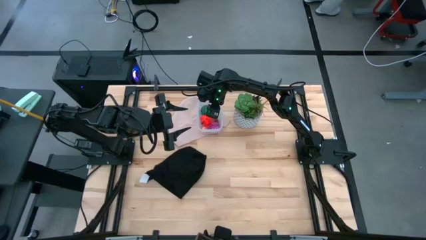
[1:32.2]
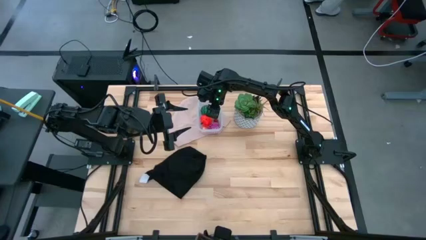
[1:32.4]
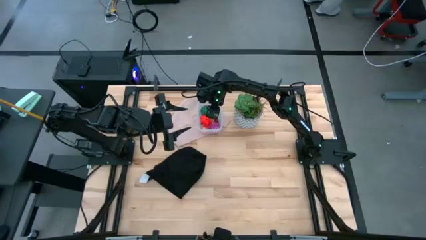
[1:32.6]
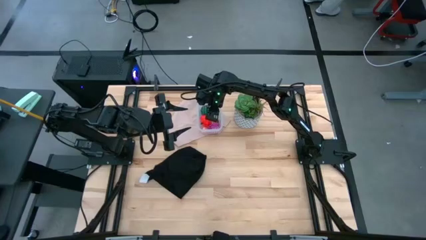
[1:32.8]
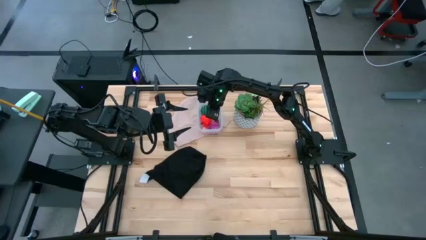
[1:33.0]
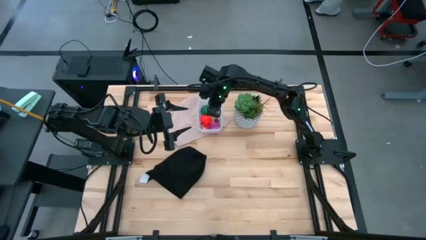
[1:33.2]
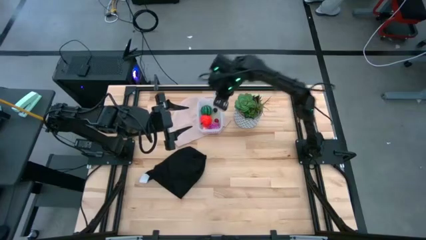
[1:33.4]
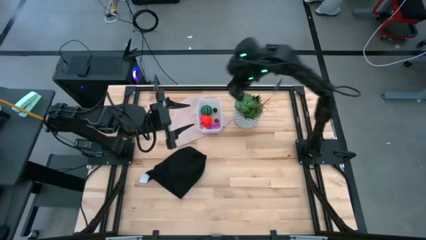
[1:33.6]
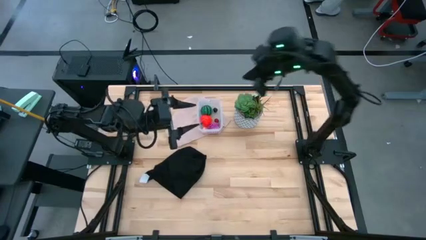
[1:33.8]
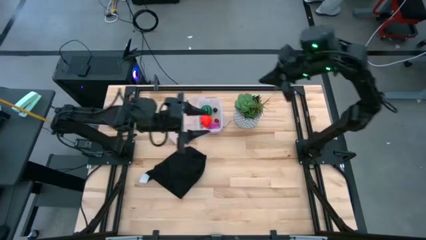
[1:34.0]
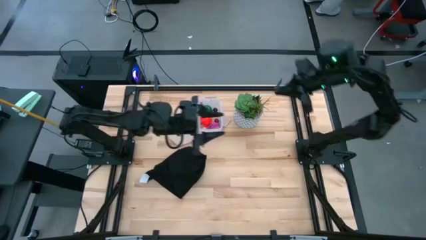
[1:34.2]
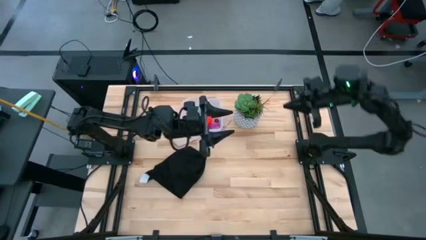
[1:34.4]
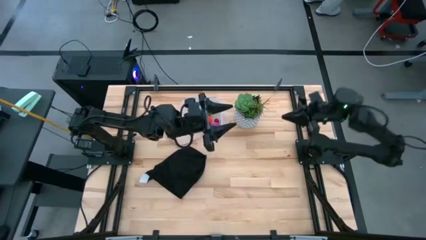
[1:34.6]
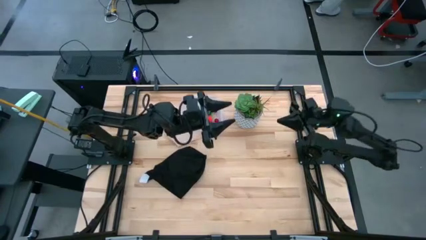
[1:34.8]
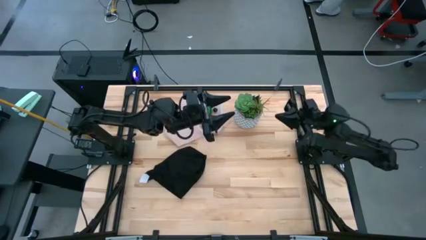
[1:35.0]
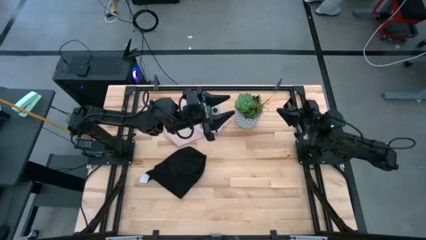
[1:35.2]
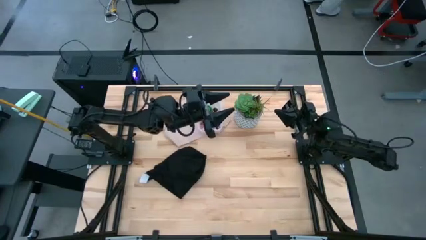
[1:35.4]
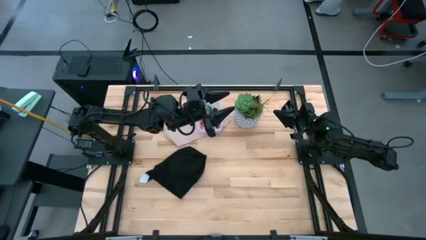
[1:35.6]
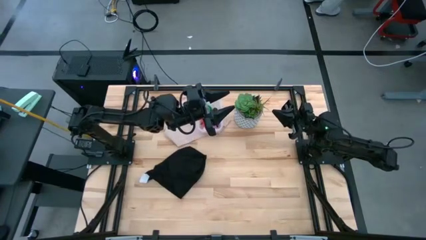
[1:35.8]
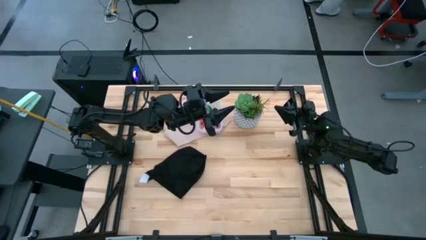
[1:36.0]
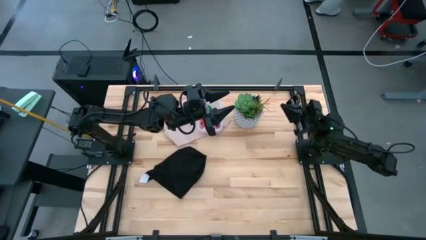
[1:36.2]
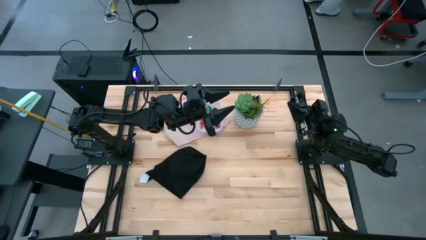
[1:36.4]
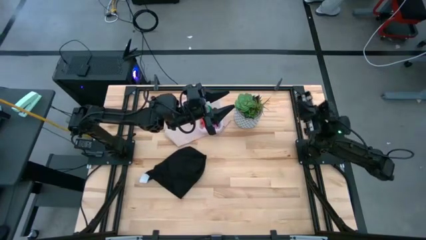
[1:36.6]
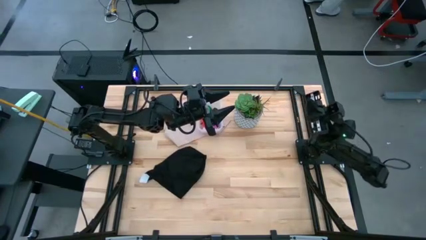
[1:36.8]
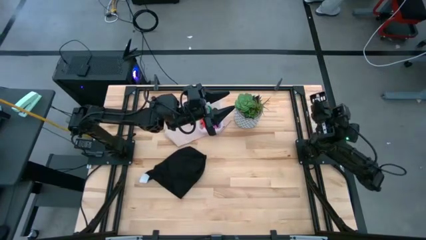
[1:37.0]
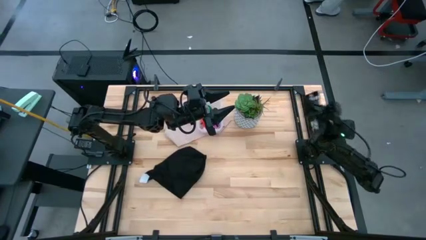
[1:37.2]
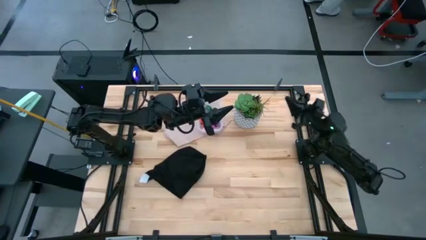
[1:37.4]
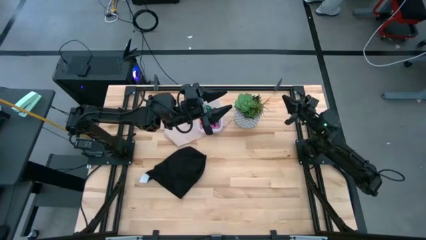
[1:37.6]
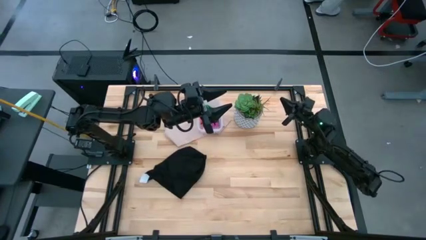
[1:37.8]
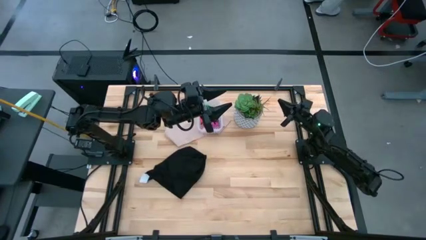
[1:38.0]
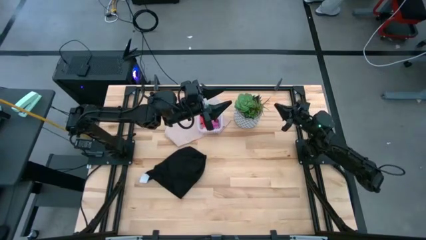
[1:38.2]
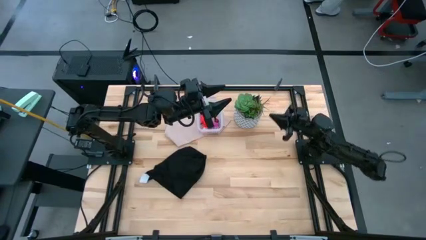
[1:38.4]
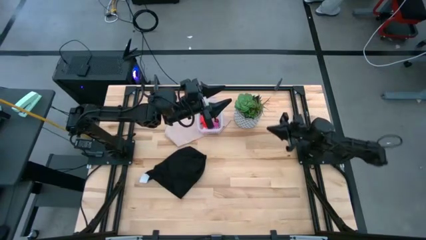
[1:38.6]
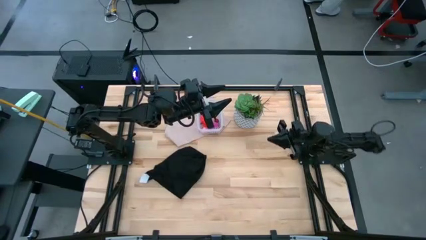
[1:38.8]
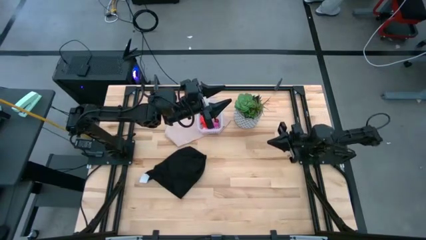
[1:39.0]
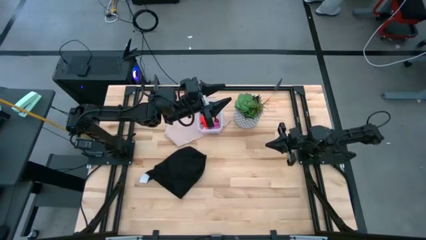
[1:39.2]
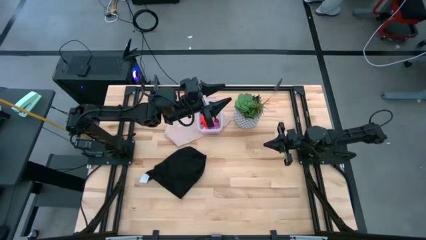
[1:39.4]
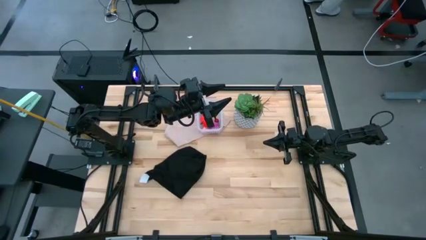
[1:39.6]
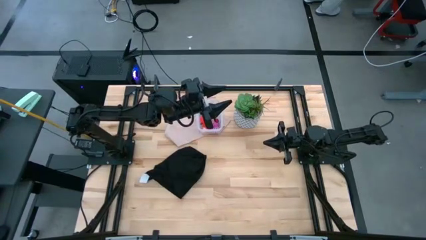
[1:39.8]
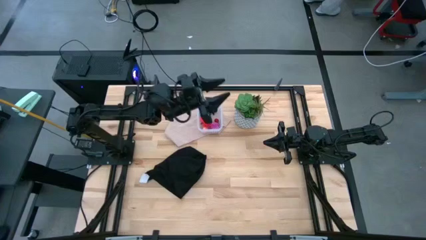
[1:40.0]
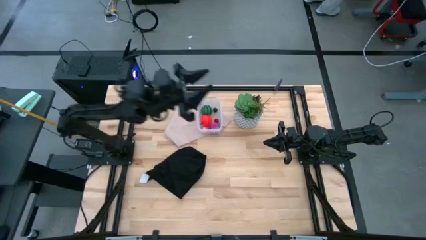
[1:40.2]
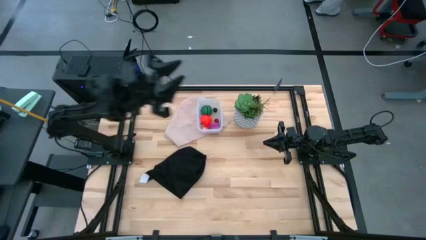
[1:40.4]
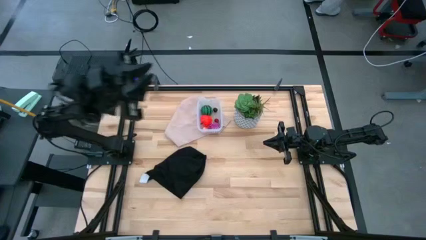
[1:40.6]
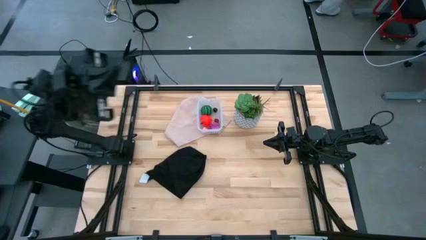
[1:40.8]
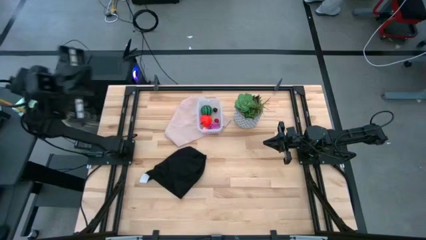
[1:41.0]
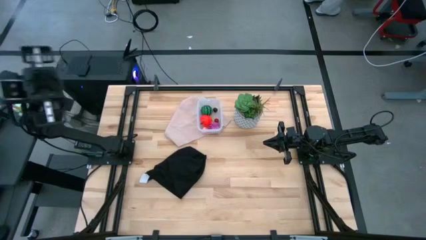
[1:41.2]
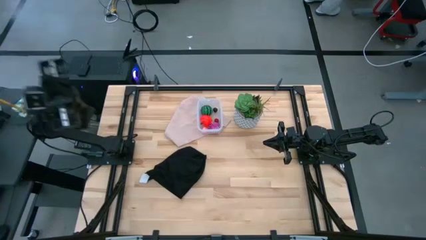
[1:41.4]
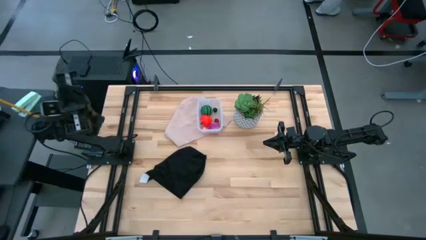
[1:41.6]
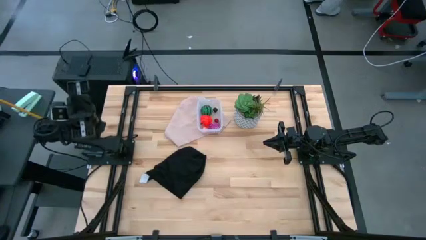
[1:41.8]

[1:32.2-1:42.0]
Task: Pick and placing Produce into tupperware
Return to Home Position

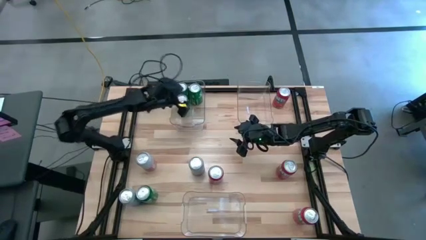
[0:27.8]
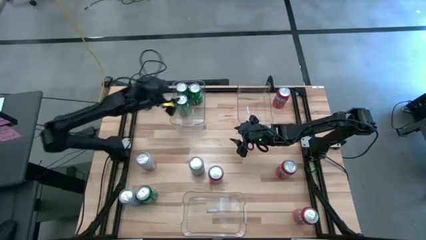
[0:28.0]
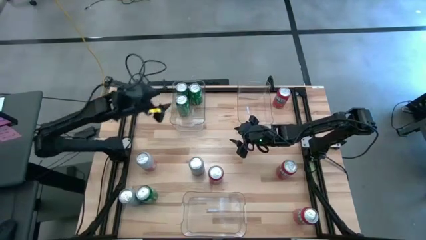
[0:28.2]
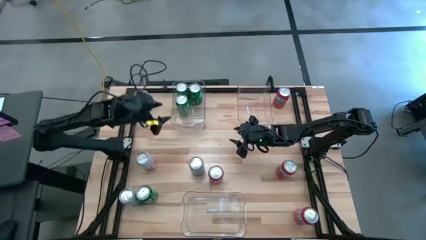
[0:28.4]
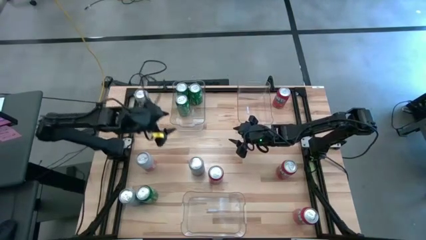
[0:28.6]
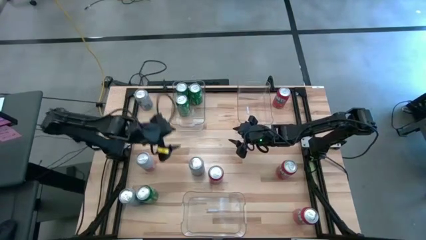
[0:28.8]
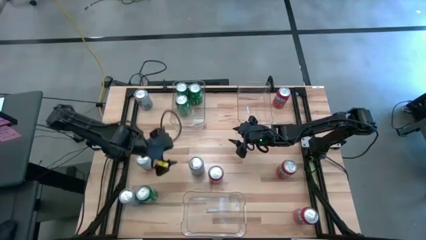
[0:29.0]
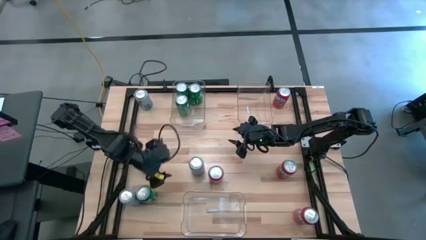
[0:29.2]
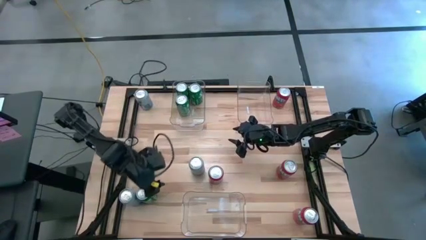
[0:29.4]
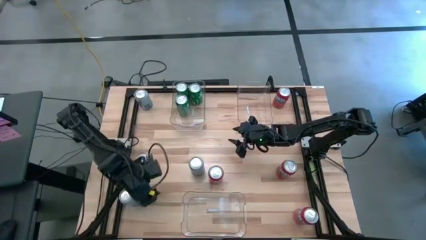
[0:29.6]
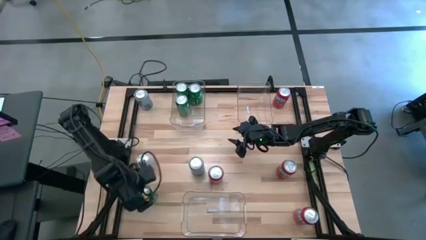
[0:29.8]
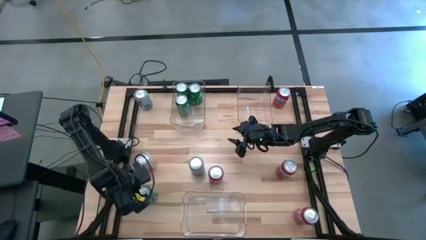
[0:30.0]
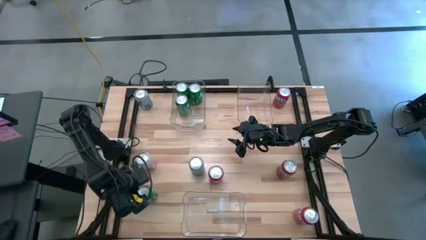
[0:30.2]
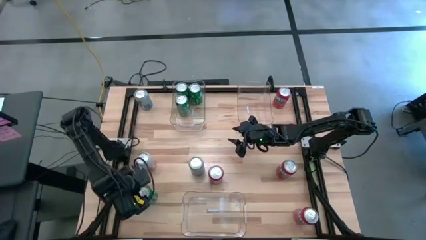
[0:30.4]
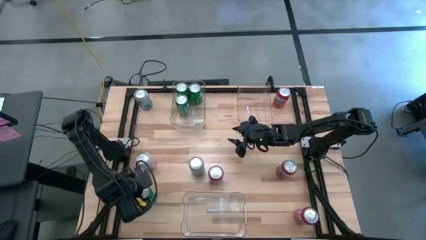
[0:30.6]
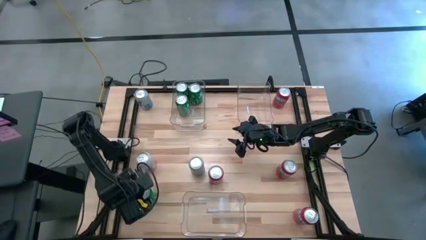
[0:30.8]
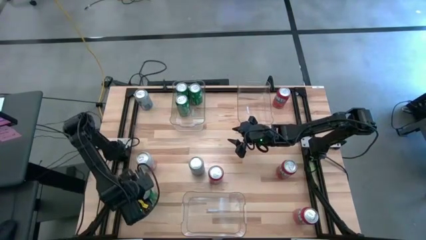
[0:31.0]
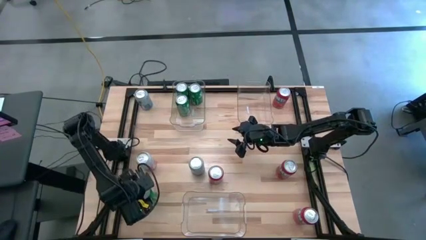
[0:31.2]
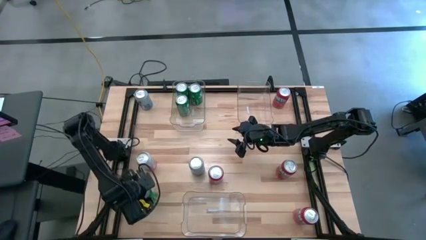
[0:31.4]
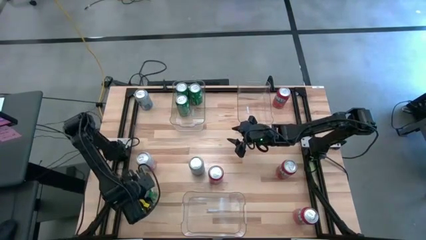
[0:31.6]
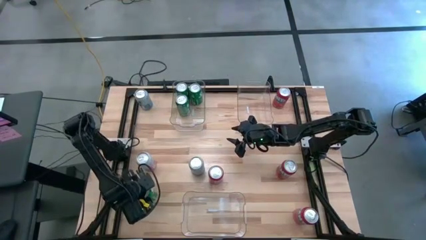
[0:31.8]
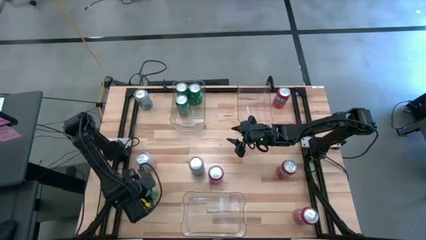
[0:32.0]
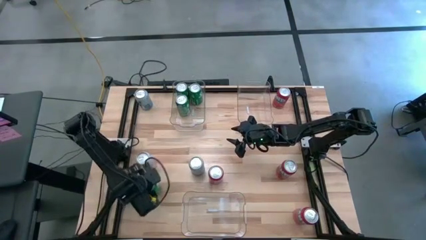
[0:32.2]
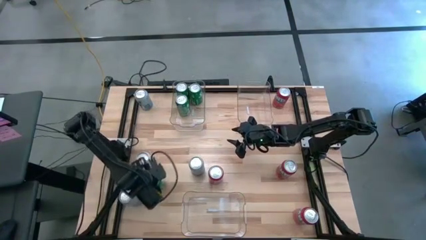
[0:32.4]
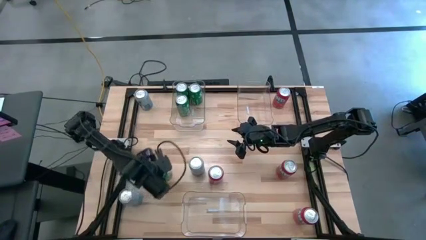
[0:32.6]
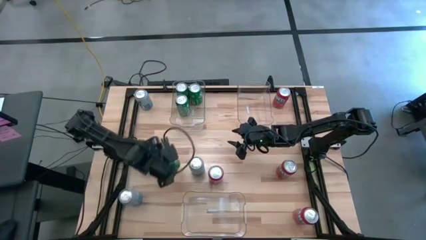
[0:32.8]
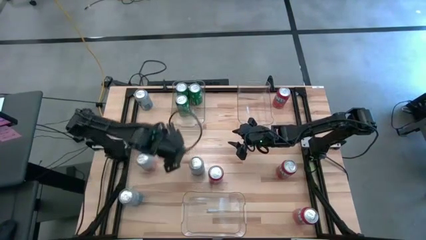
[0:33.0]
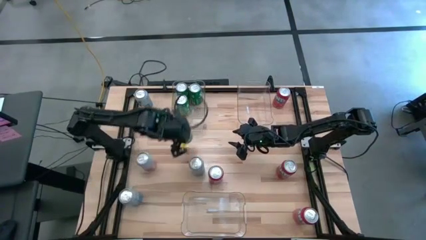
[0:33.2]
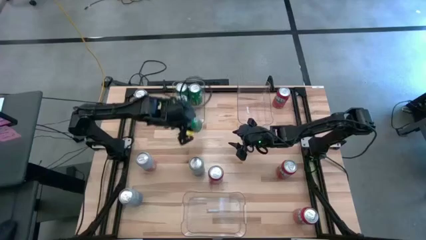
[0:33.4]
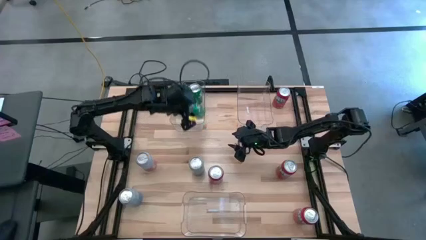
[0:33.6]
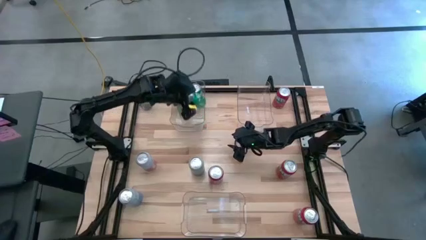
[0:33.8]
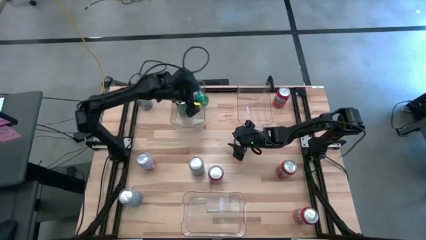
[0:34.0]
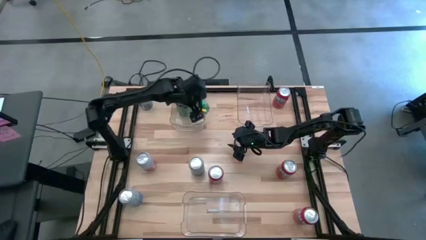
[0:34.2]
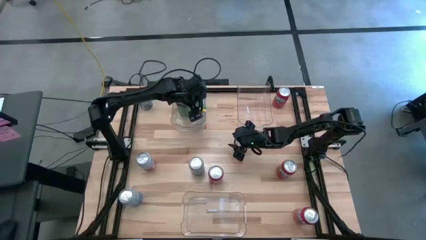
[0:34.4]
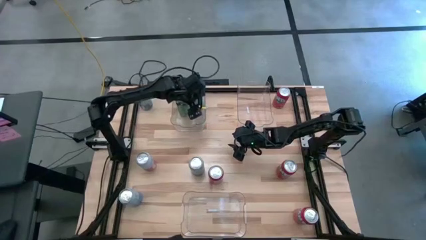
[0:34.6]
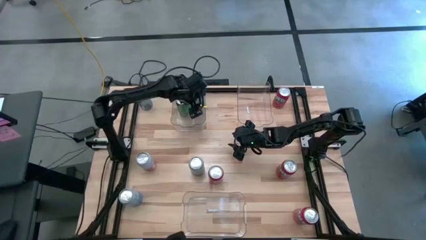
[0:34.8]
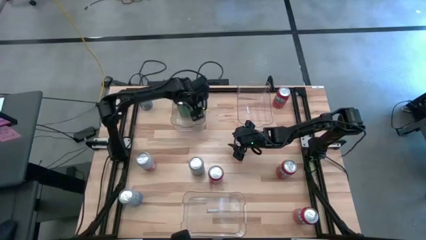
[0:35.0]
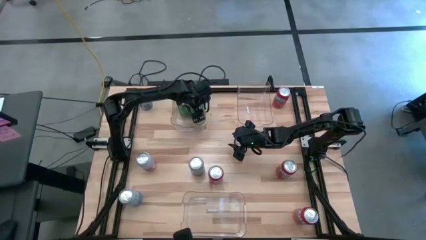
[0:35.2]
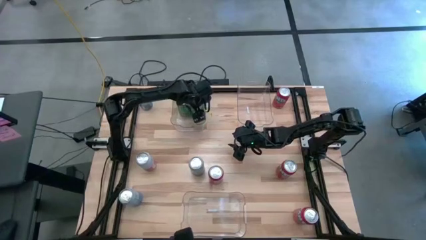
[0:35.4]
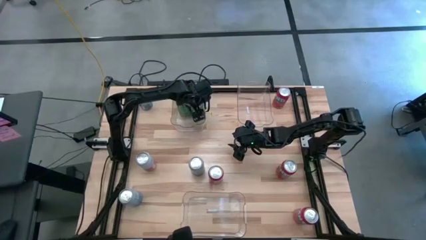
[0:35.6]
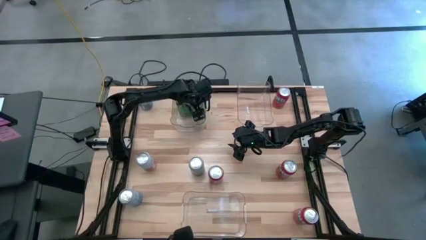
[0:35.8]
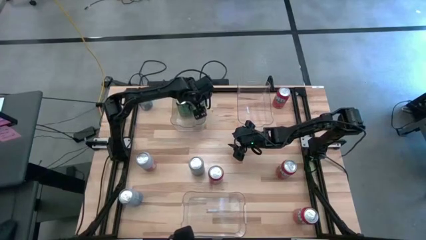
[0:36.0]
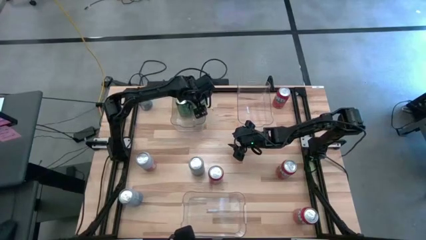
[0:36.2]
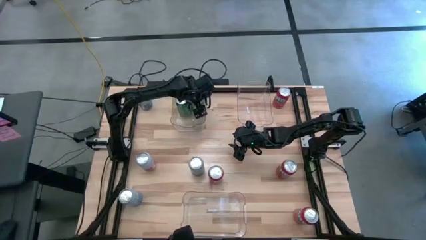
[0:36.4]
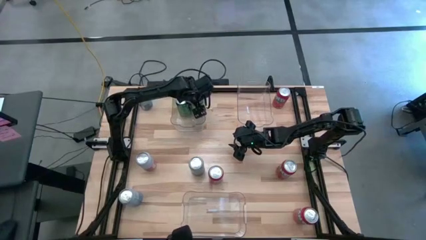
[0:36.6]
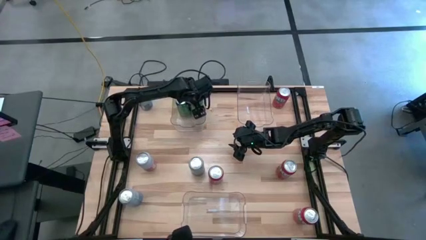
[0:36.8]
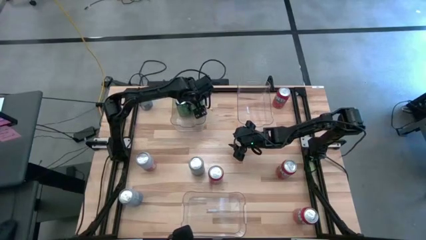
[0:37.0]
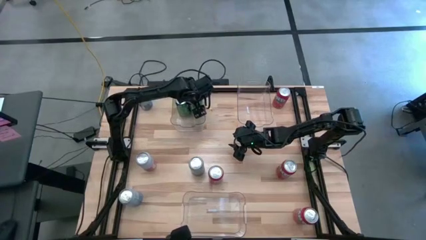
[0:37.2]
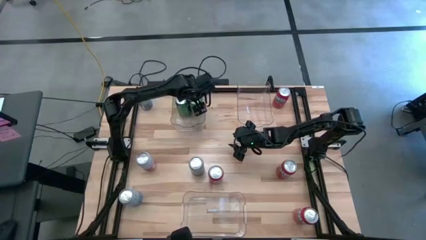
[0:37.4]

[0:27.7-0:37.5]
Task: Sort soda cans
Put the green soda can into the top left transparent bin
